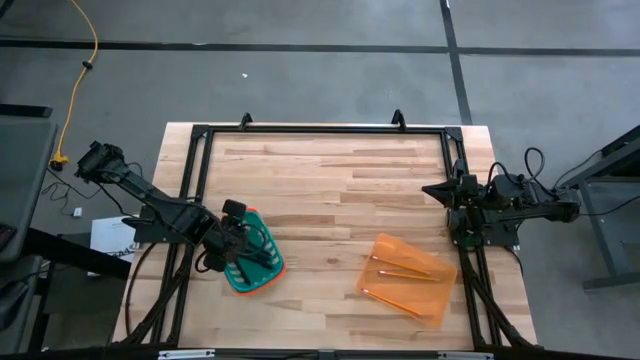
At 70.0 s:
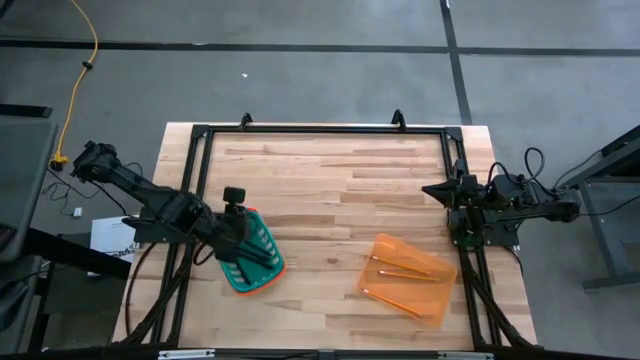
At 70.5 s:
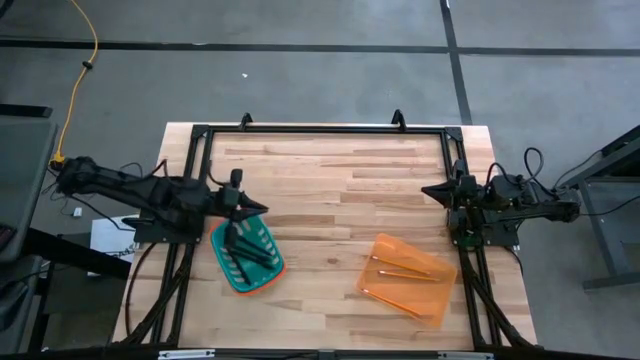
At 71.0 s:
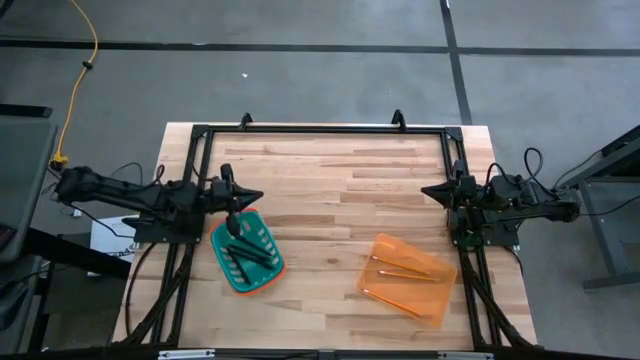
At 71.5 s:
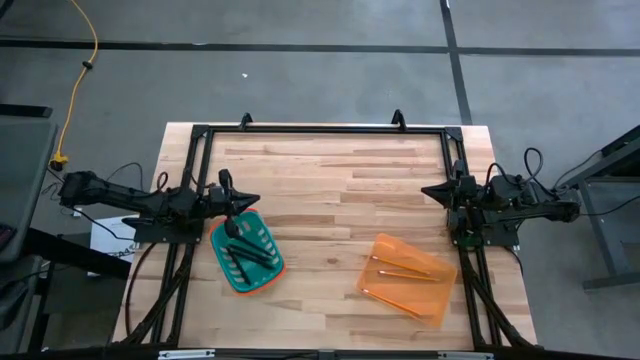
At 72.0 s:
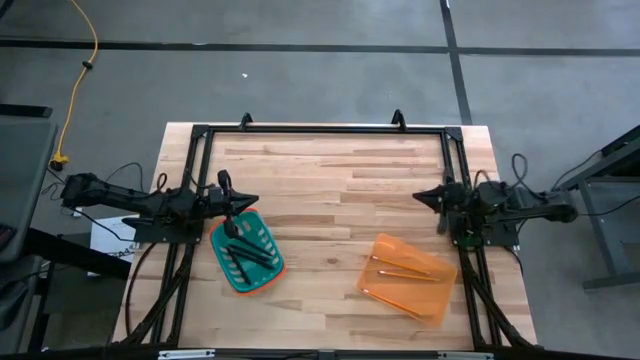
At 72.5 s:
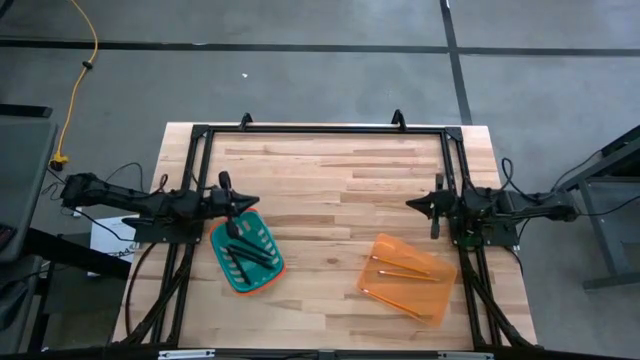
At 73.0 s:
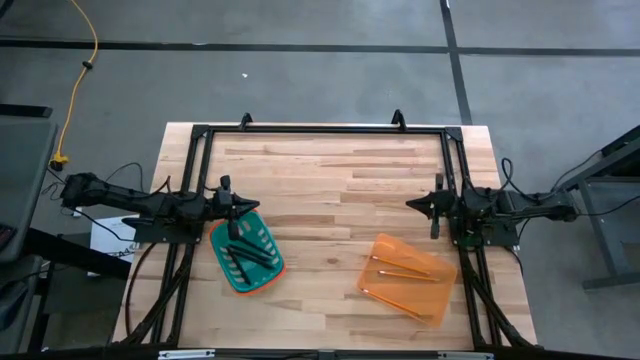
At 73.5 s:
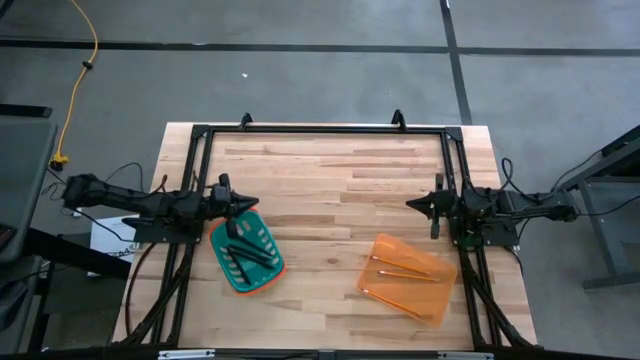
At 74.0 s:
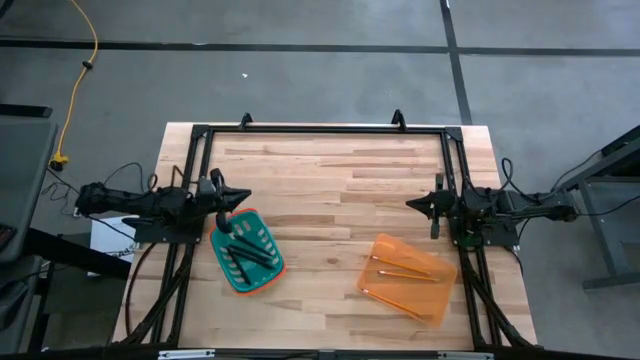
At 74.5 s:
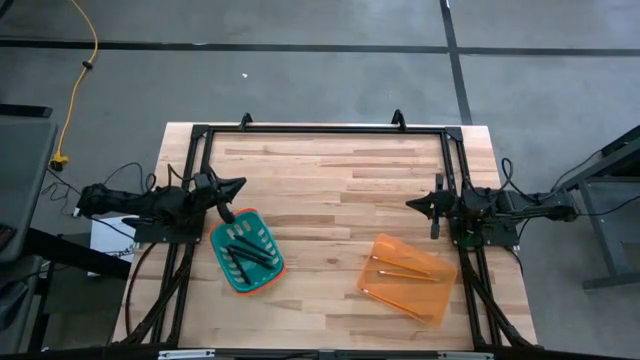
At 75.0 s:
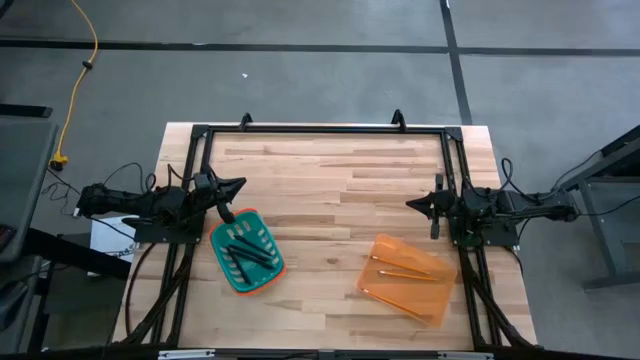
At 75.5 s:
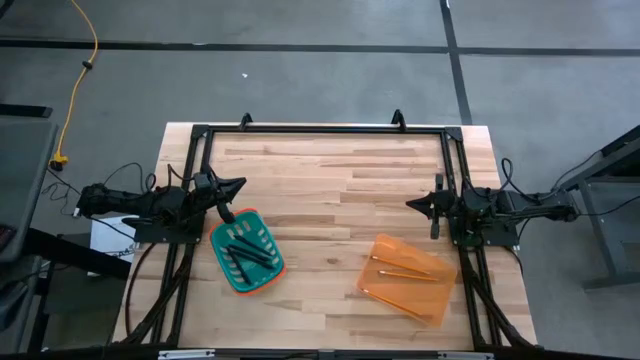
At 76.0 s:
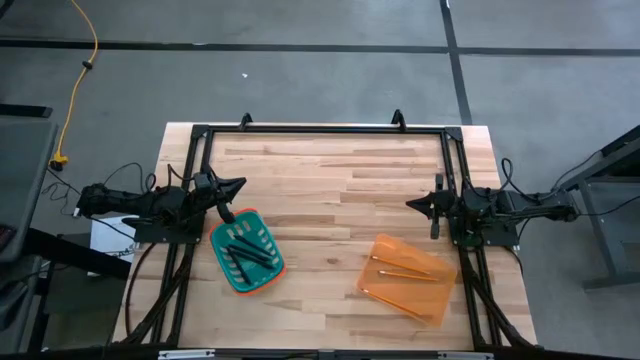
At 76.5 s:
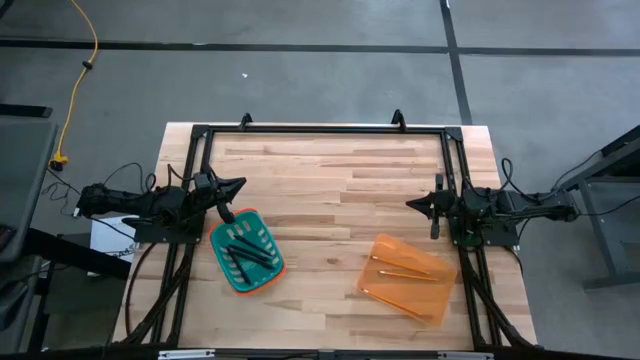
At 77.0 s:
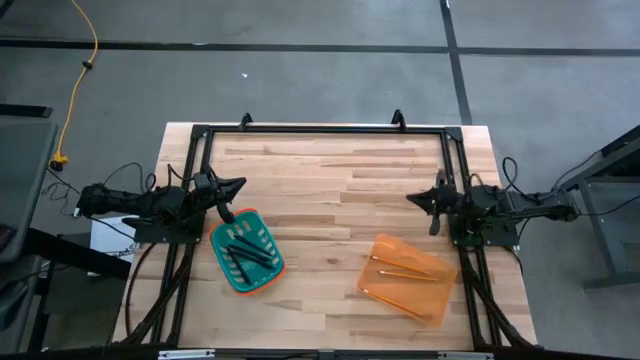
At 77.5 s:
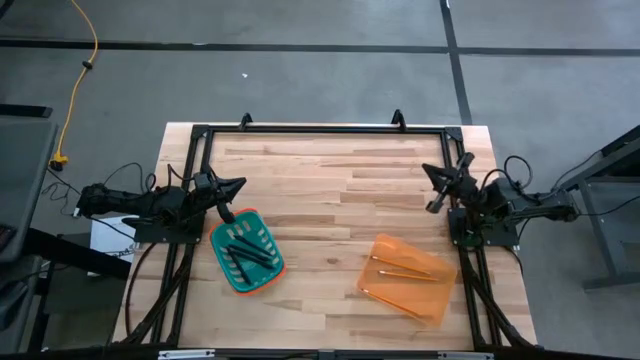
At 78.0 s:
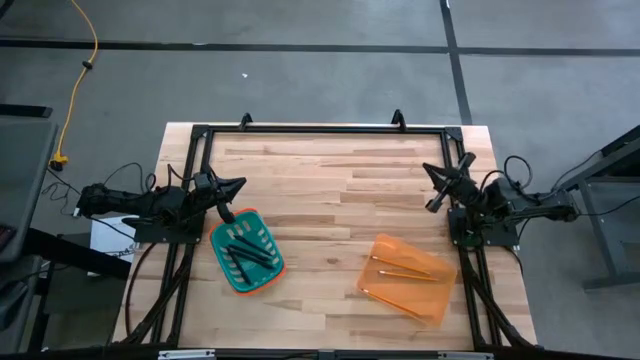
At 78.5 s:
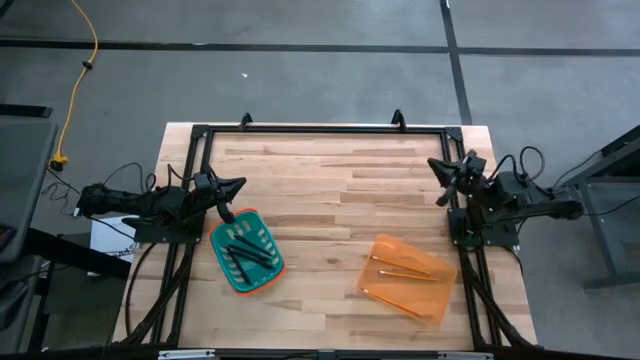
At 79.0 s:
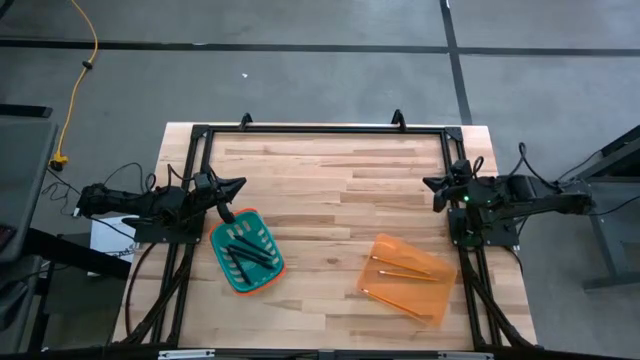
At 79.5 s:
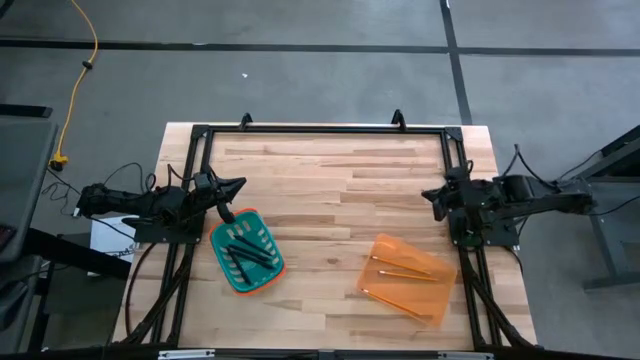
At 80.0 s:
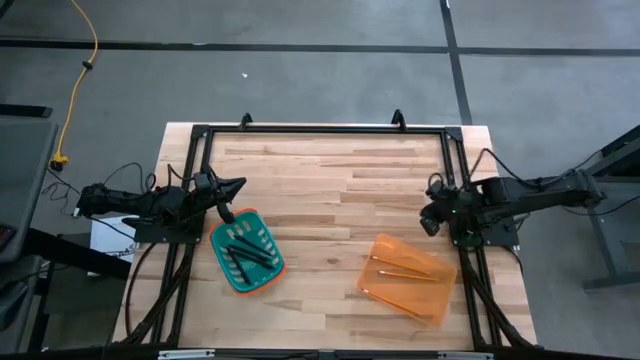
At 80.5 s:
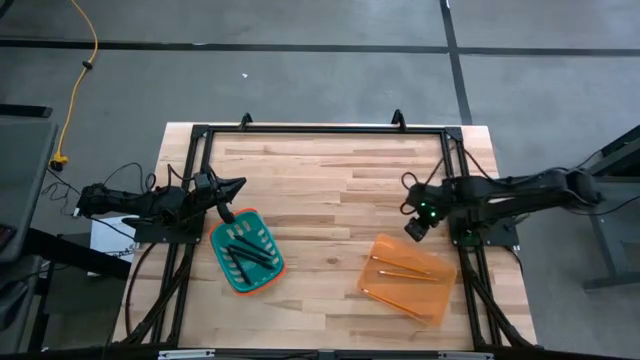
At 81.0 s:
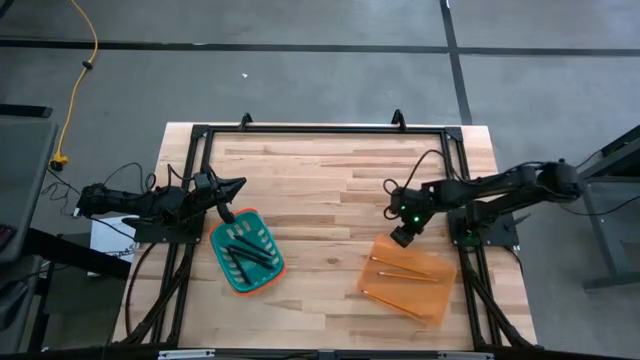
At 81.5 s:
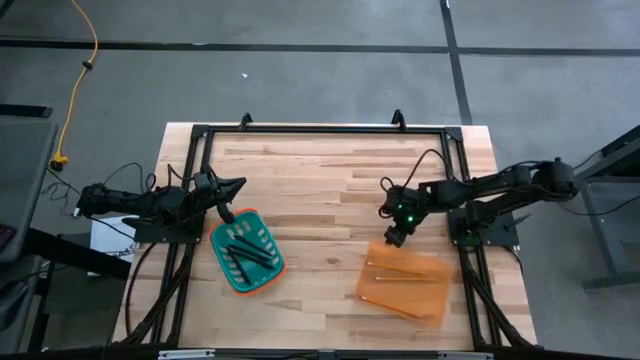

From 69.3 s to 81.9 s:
Task: Sort pens & pencils
Adjust the orange bin

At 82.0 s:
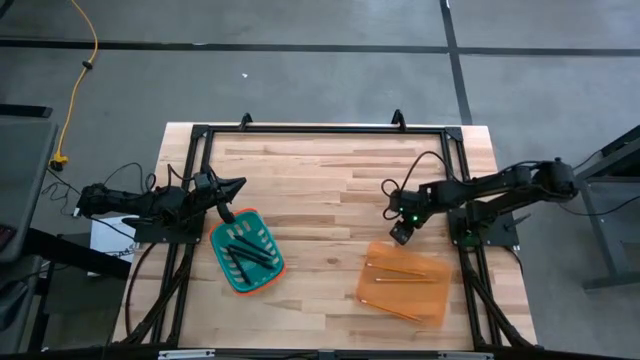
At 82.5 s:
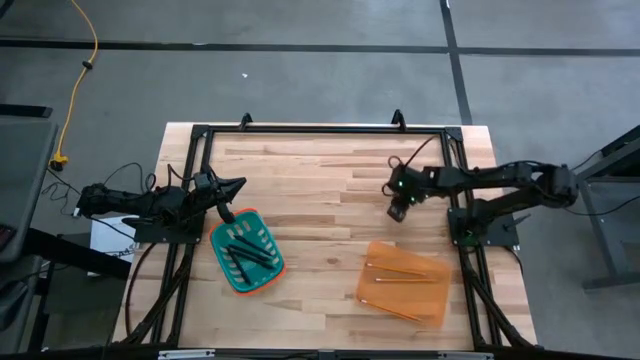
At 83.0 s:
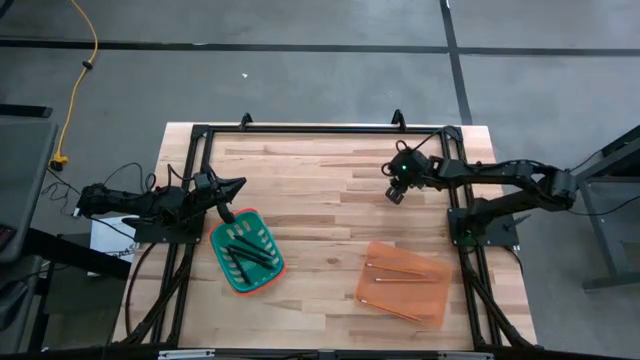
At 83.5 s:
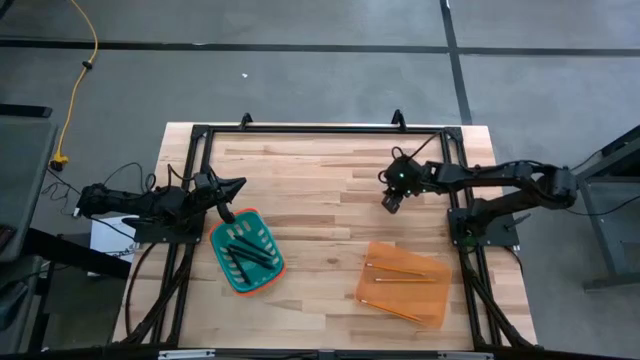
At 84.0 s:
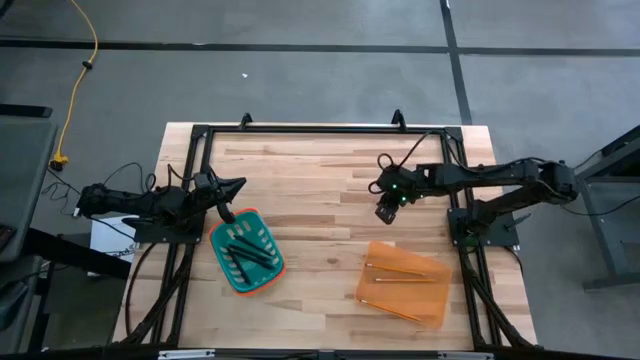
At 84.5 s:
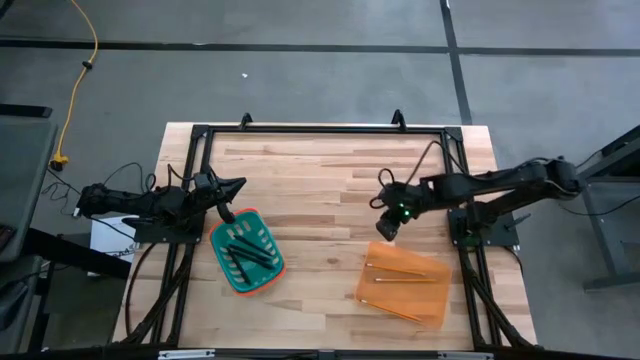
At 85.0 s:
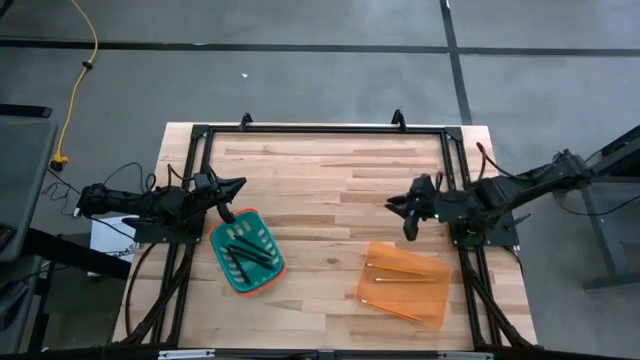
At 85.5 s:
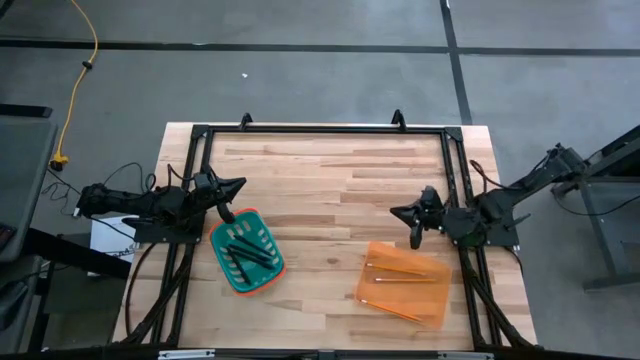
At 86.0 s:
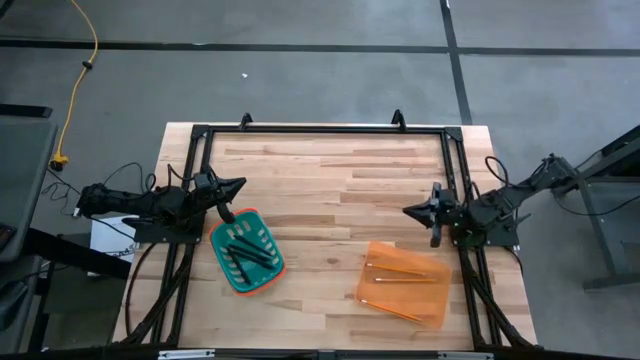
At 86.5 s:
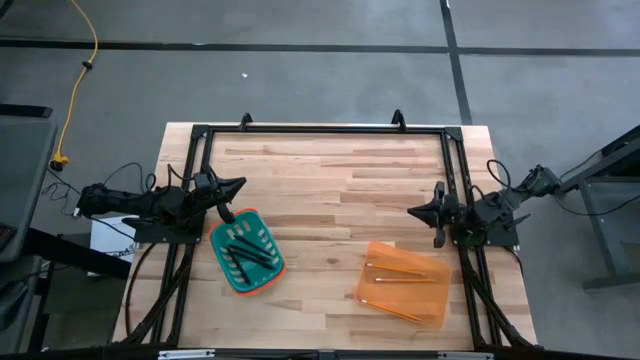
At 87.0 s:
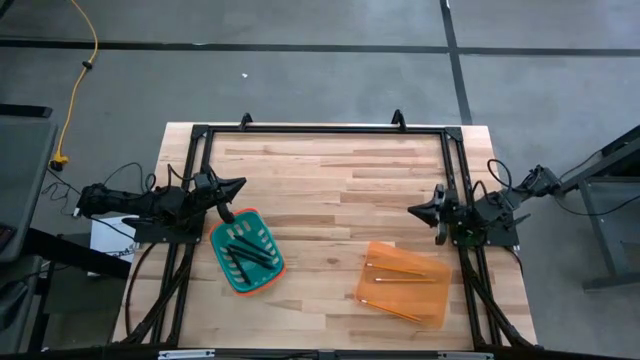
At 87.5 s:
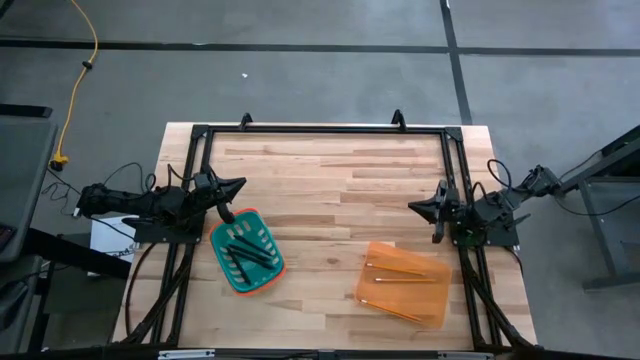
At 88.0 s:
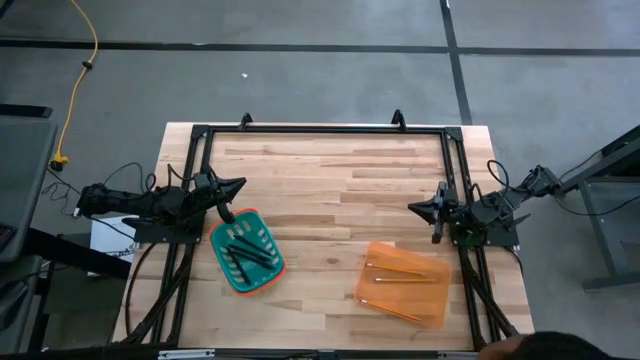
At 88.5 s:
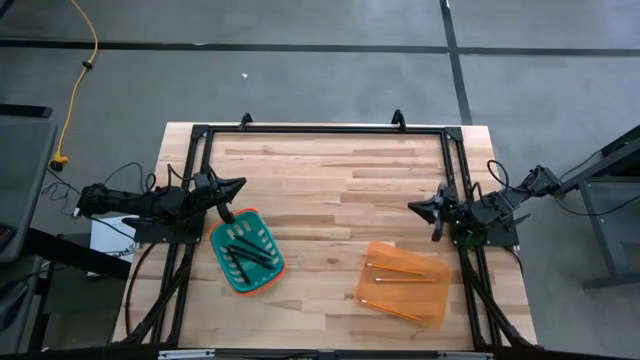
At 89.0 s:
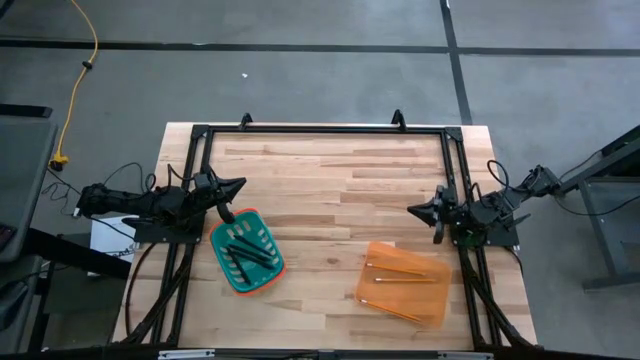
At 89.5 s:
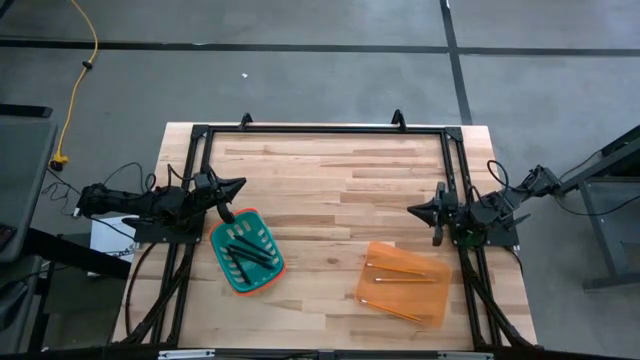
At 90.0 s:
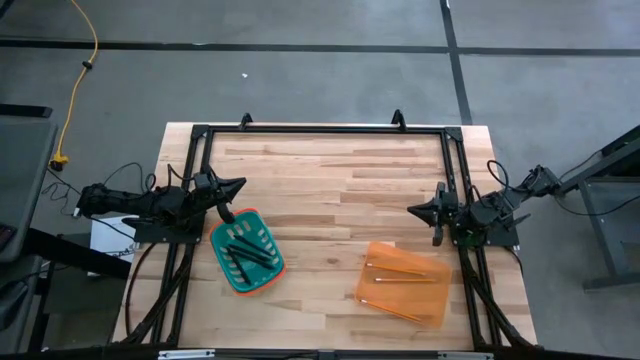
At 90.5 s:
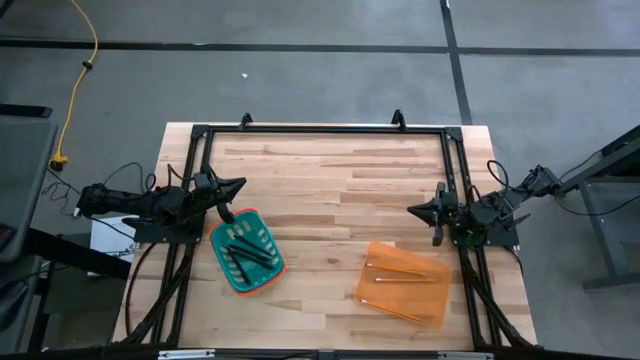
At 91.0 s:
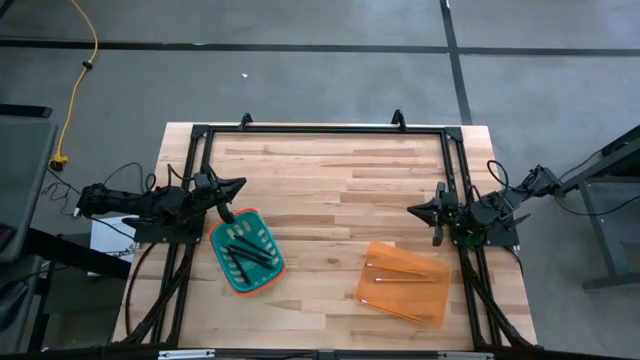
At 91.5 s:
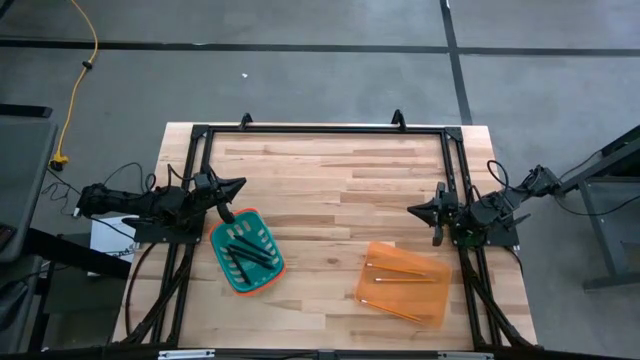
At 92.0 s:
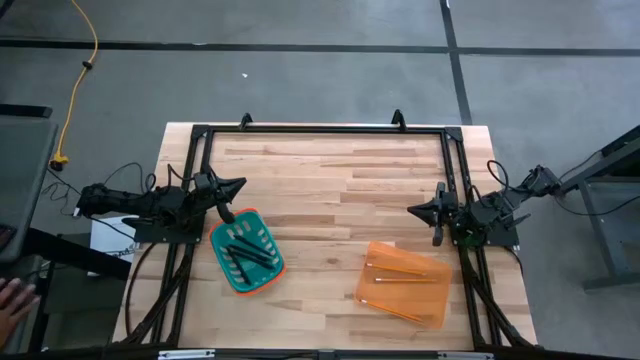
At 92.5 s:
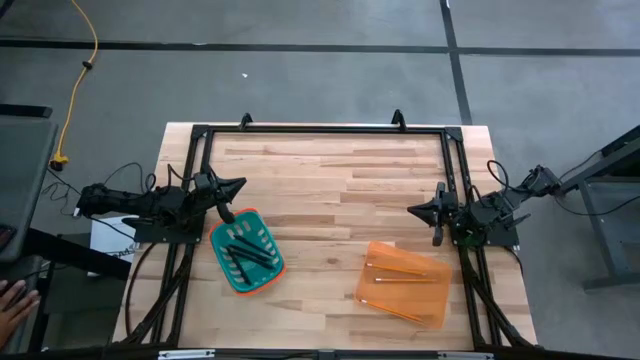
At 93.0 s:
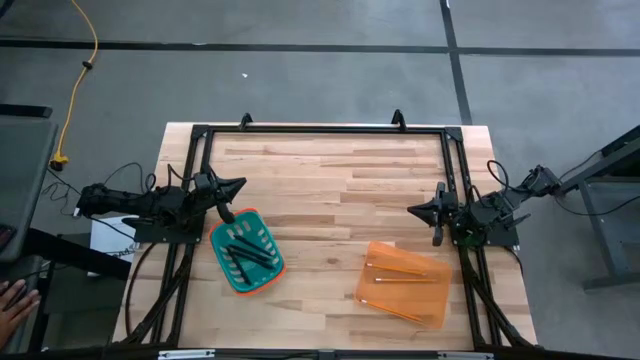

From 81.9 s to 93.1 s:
Return to Home Position
